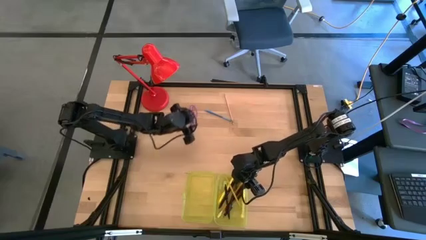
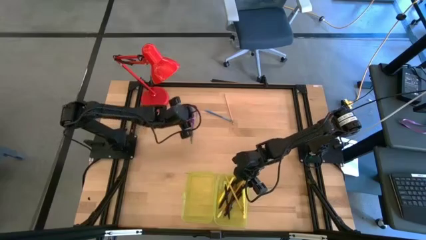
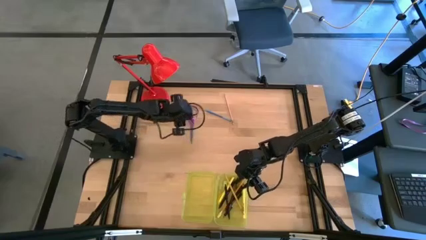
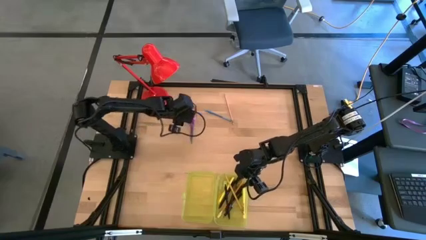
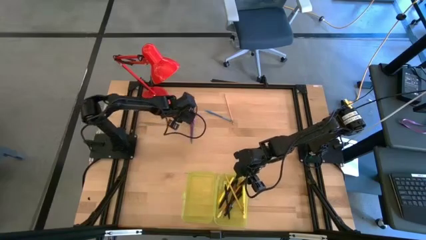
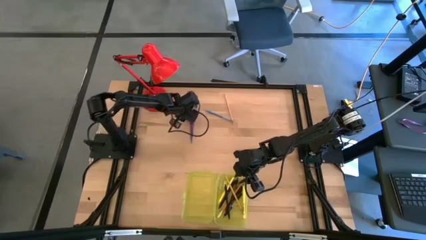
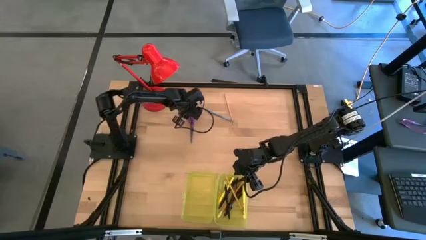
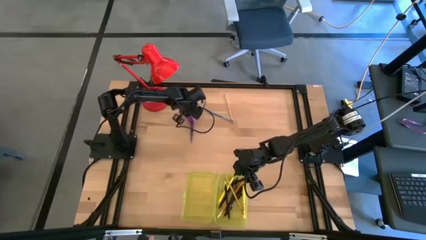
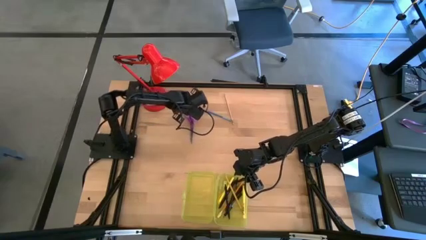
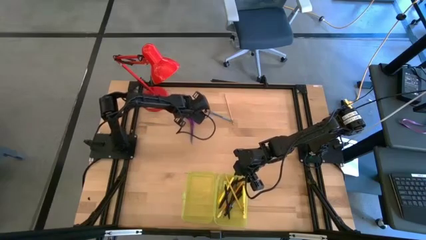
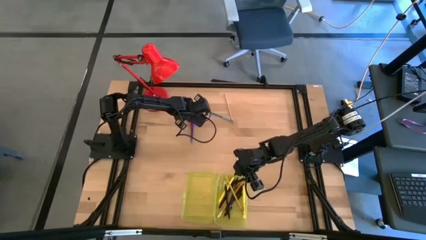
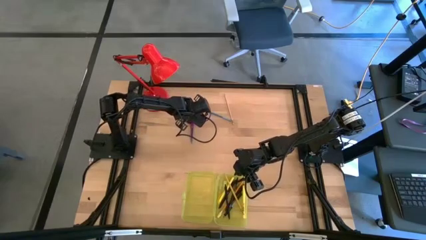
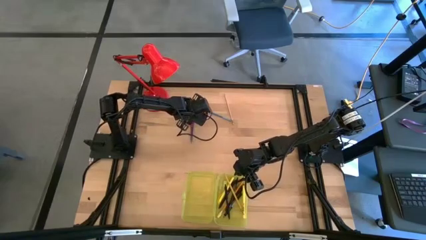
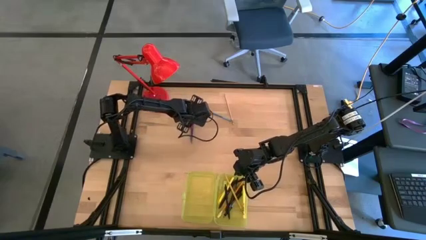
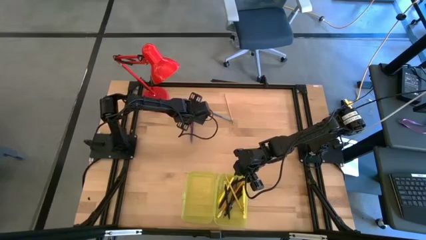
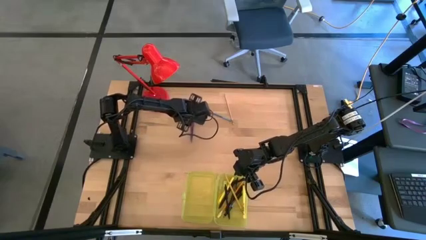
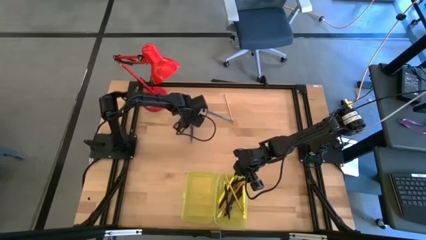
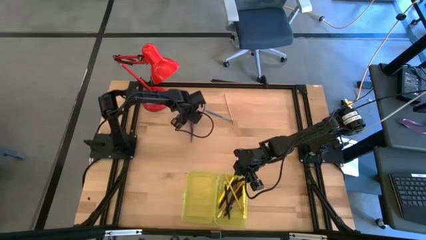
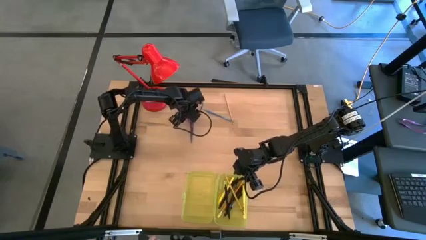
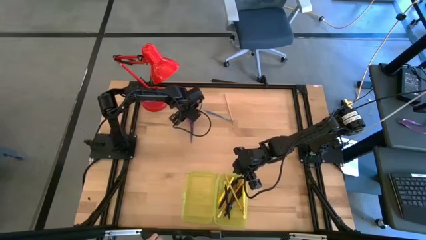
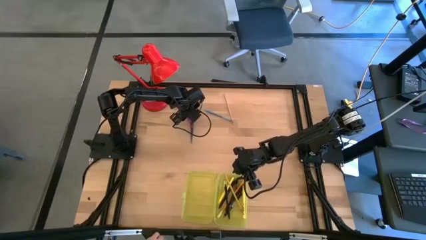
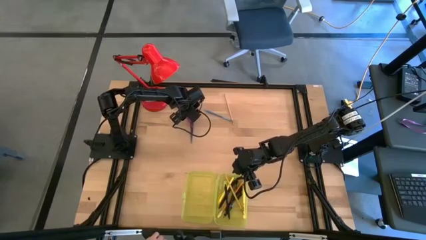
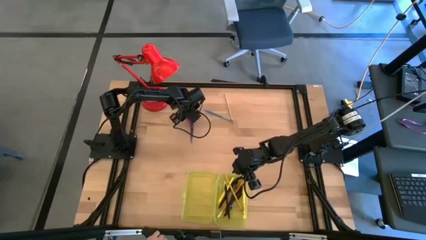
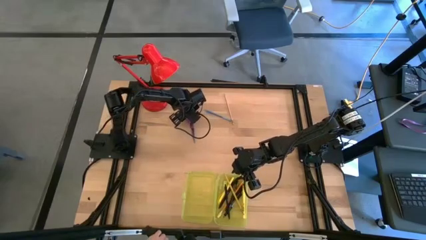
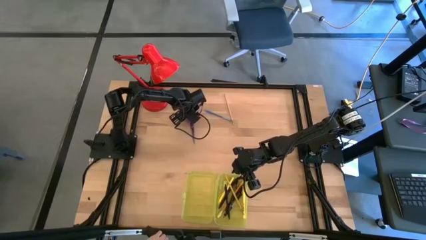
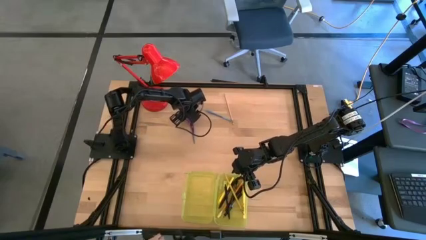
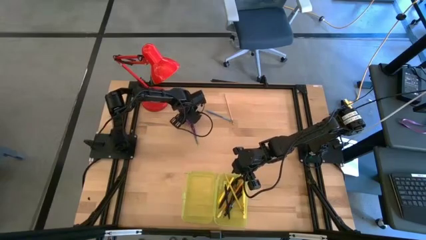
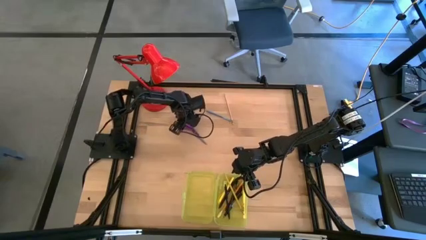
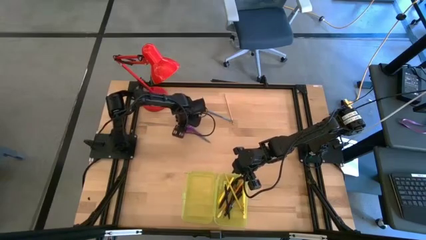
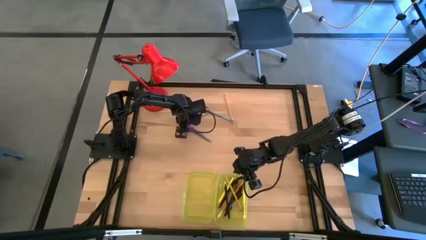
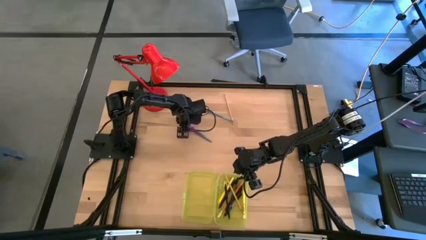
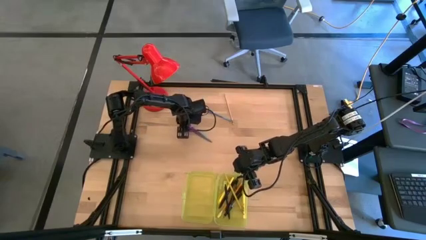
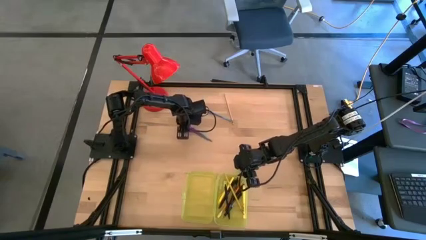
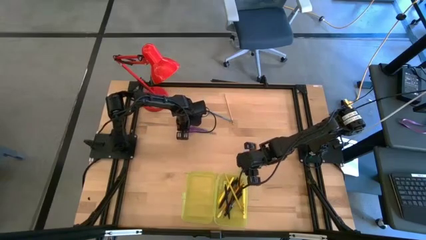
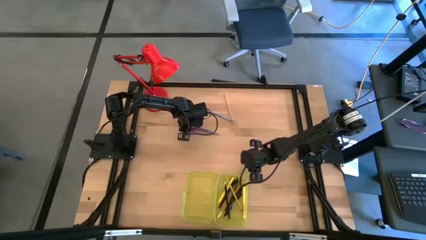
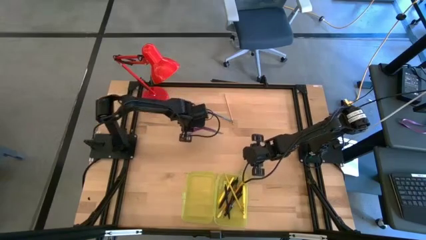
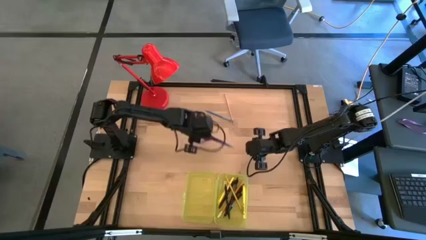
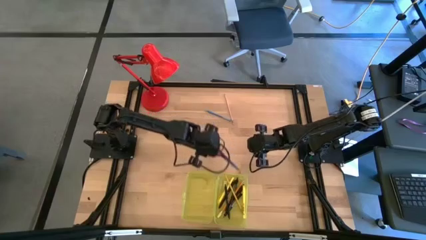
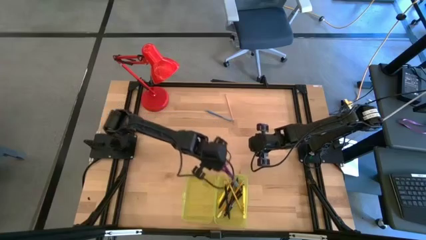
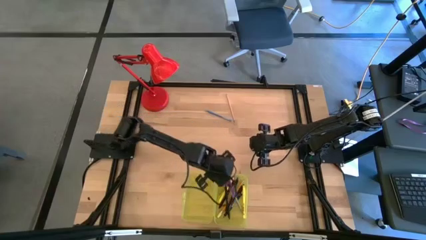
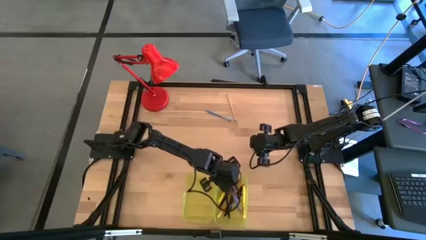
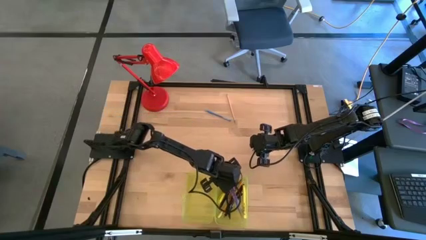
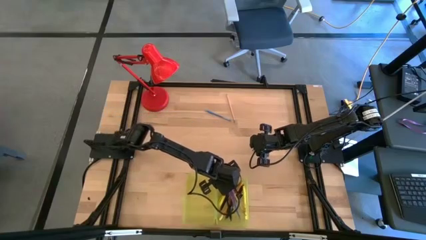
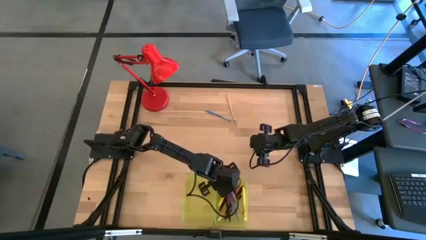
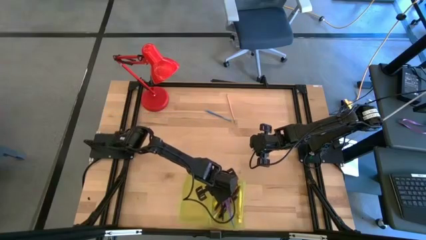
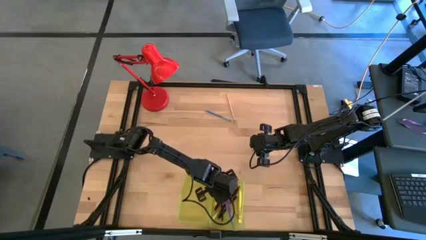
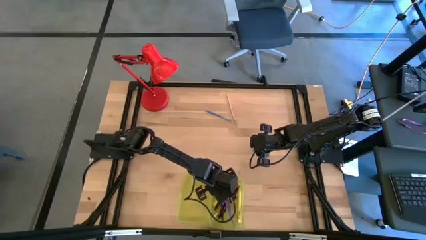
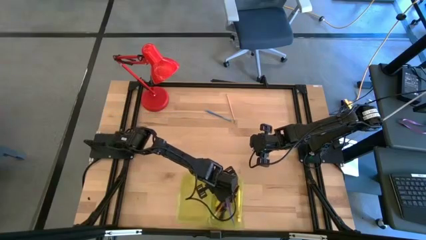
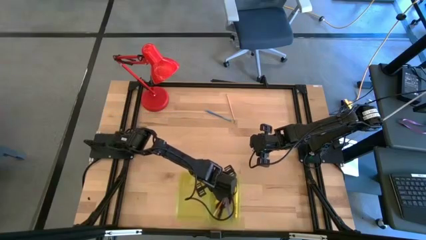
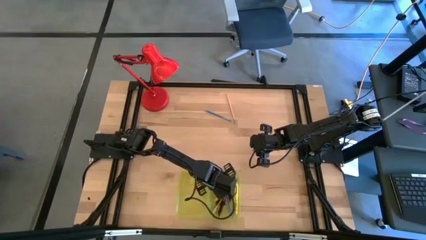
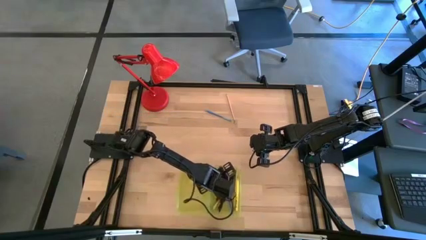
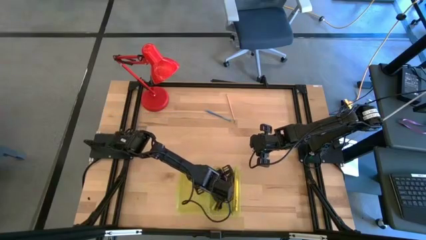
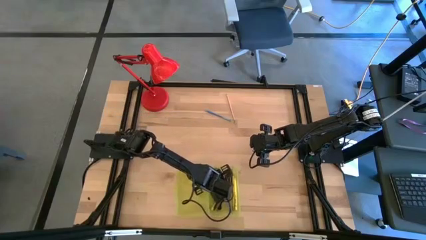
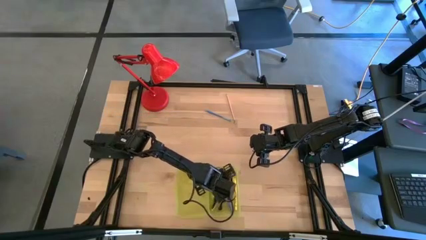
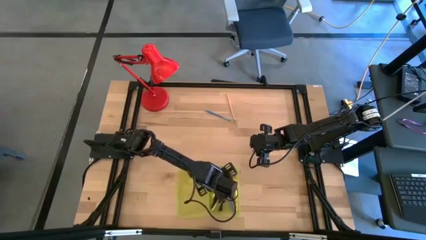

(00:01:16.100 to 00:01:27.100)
Task: Pick & place school supplies into a supply box
Put the violet scissors into the yellow supply box

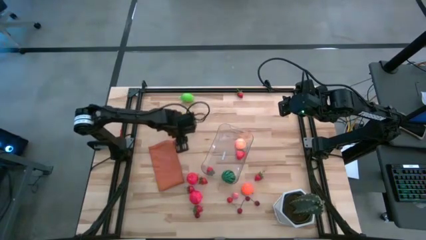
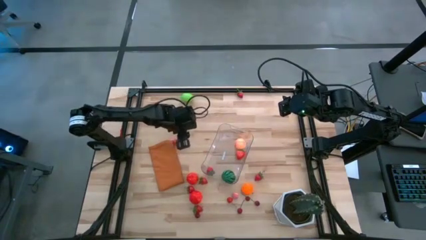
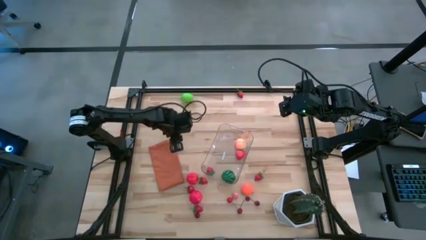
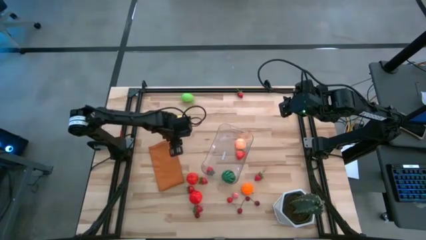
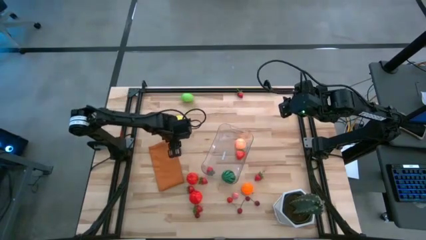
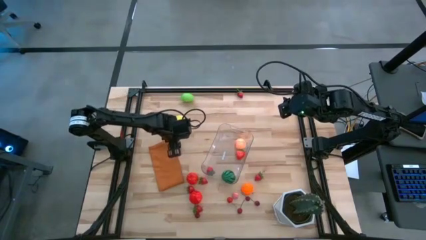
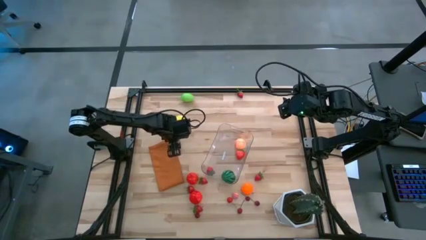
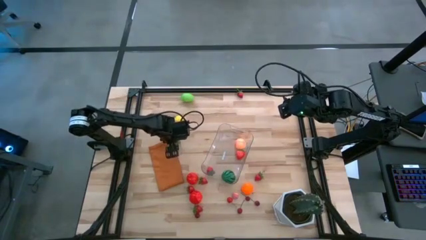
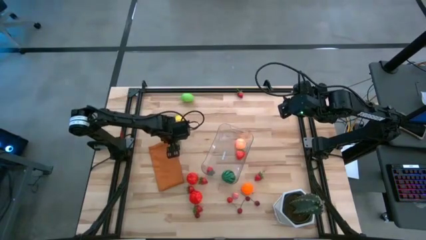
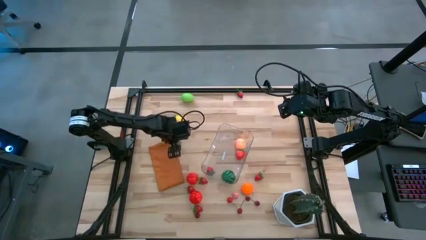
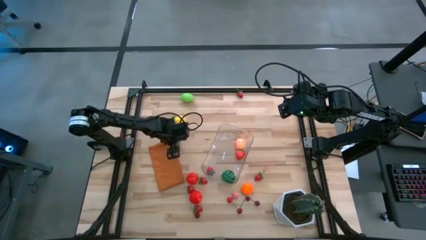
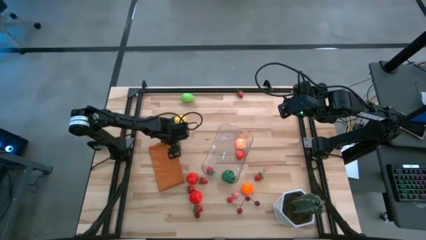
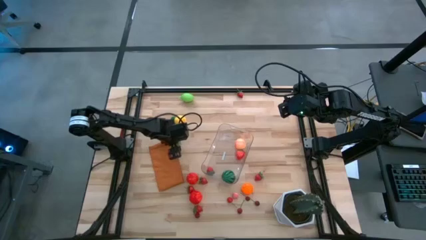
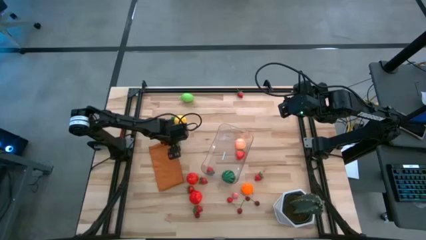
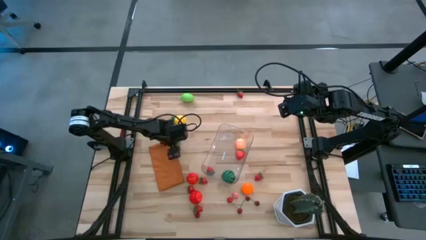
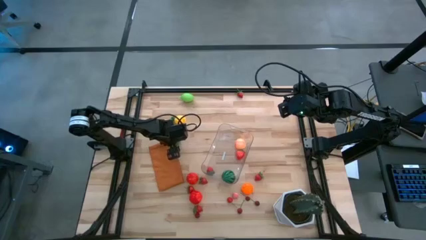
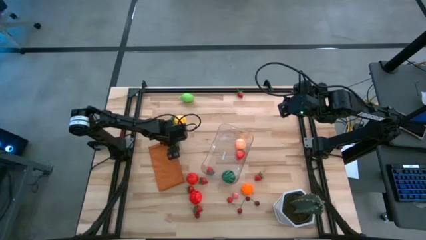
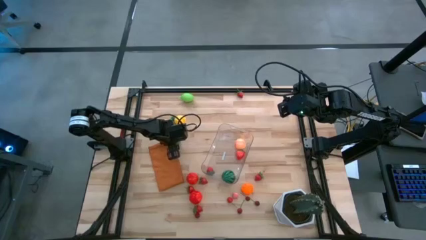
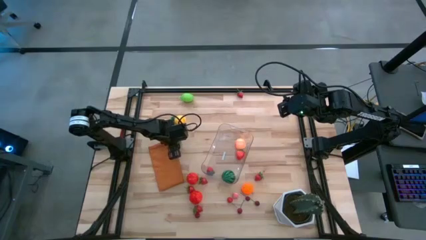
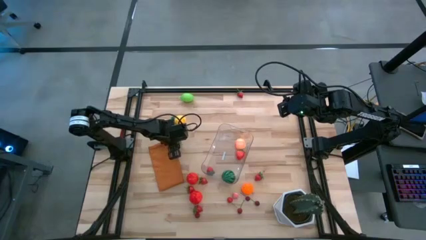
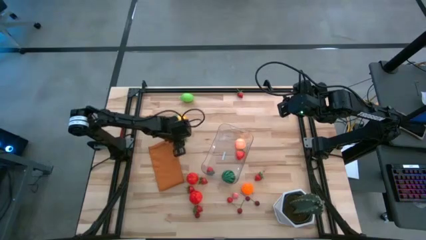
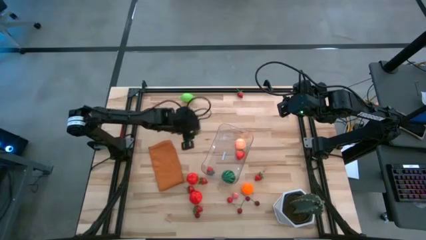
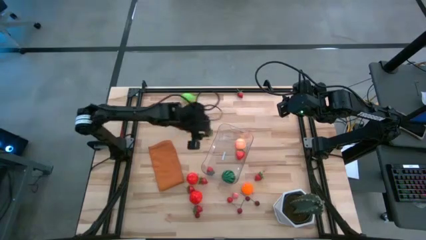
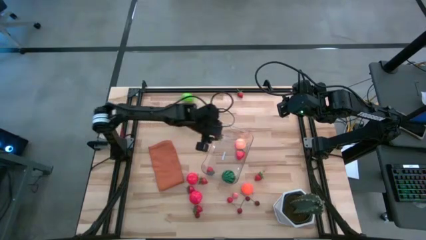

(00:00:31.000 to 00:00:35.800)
Task: Pick and placing Produce into tupperware
Put the red strawberry into the transparent bin
